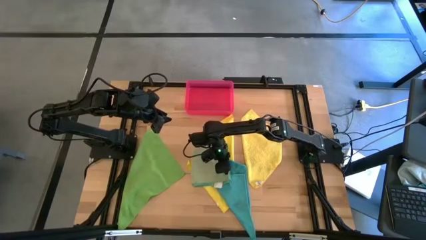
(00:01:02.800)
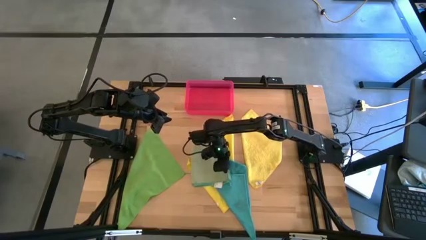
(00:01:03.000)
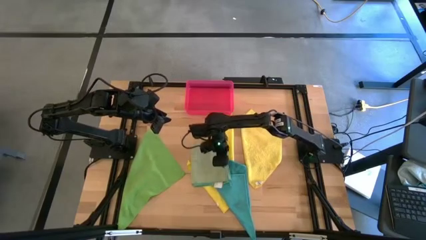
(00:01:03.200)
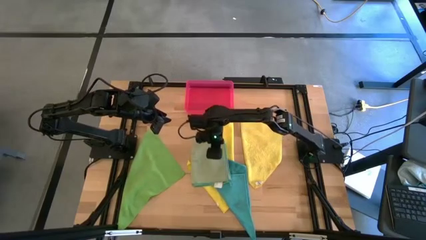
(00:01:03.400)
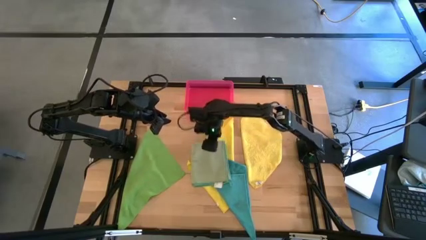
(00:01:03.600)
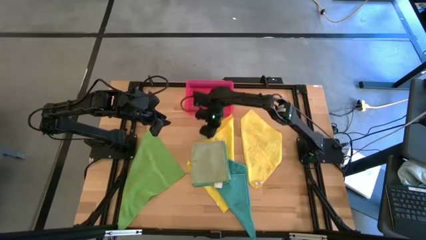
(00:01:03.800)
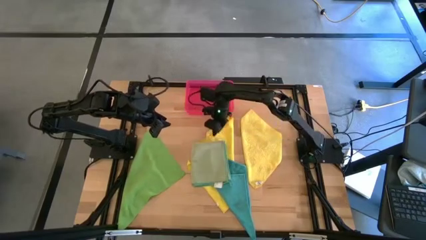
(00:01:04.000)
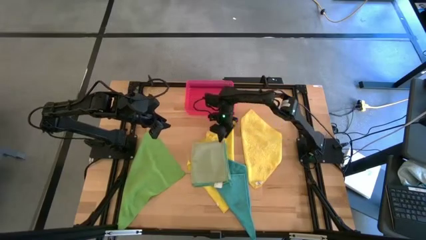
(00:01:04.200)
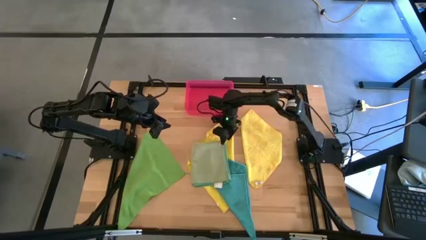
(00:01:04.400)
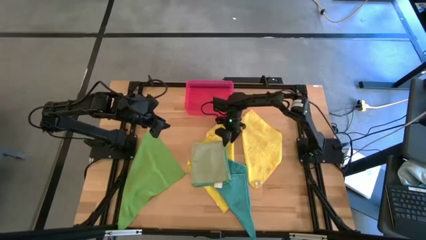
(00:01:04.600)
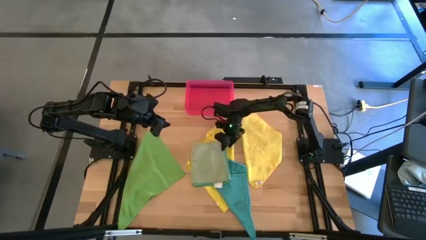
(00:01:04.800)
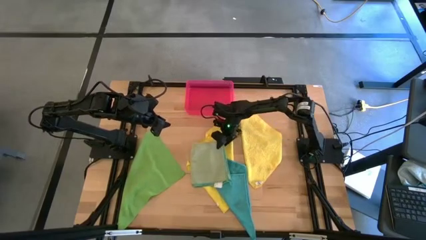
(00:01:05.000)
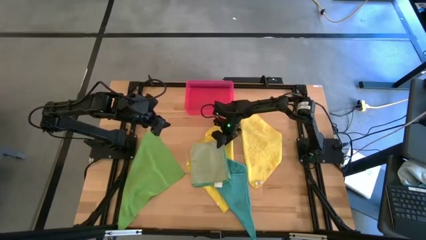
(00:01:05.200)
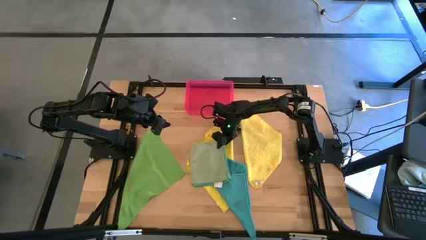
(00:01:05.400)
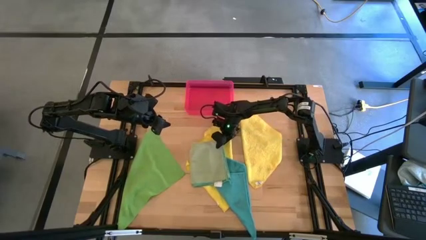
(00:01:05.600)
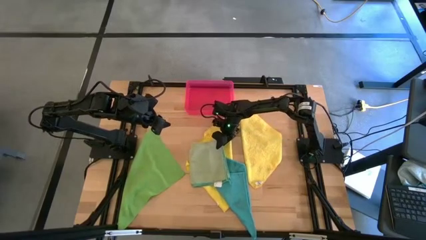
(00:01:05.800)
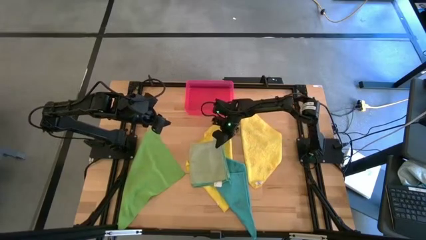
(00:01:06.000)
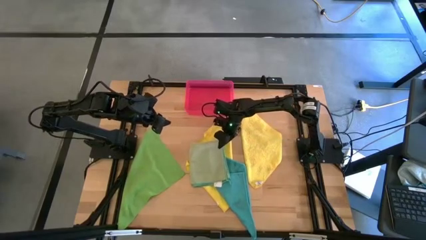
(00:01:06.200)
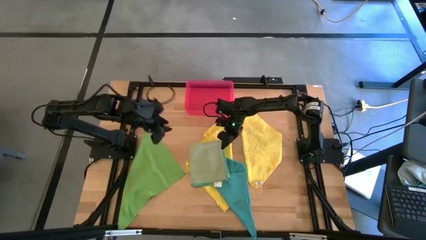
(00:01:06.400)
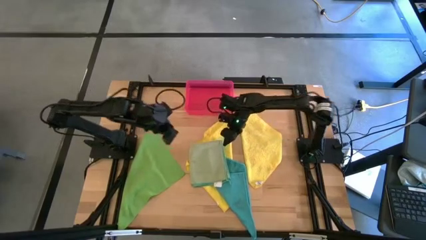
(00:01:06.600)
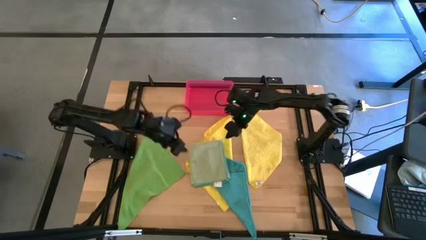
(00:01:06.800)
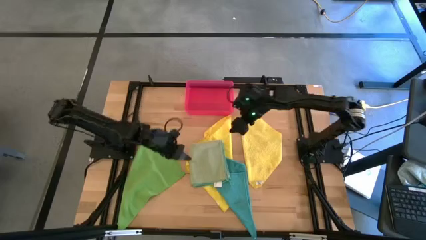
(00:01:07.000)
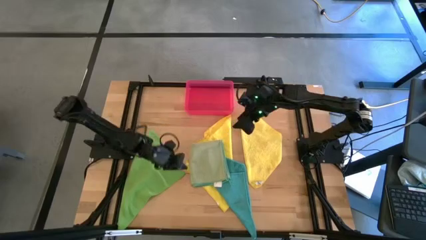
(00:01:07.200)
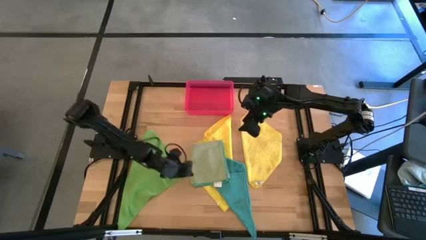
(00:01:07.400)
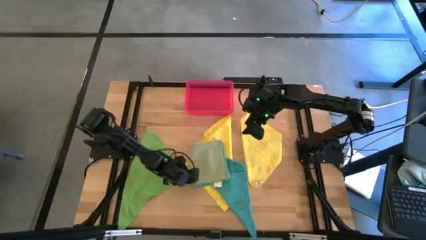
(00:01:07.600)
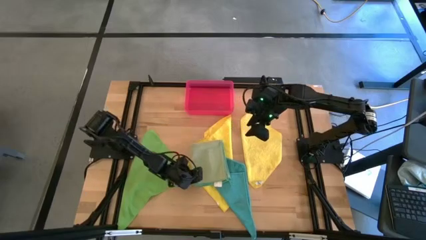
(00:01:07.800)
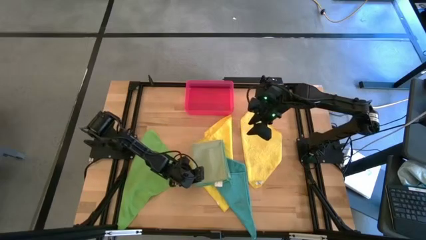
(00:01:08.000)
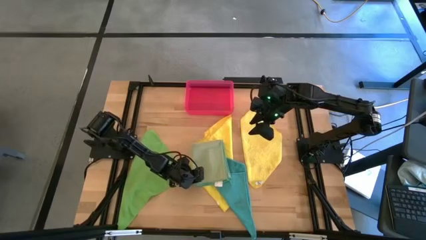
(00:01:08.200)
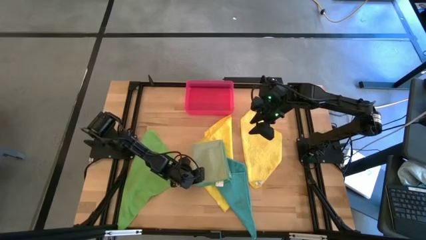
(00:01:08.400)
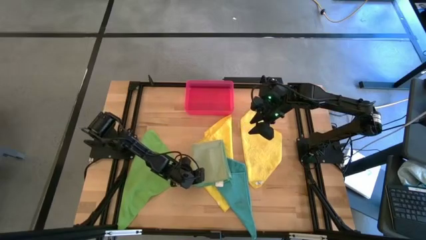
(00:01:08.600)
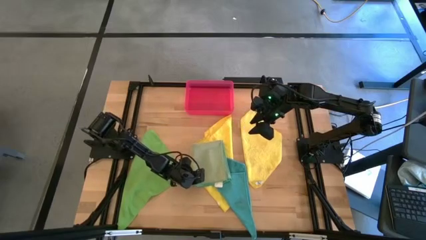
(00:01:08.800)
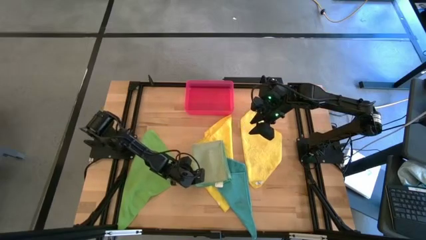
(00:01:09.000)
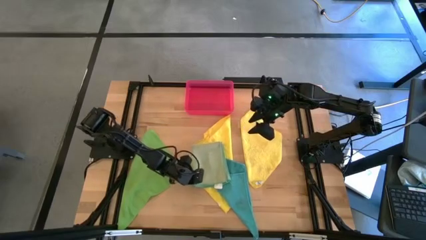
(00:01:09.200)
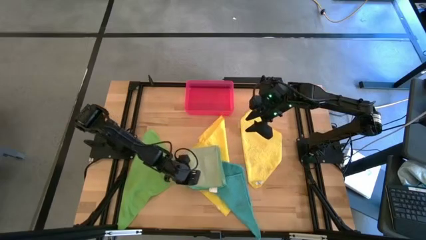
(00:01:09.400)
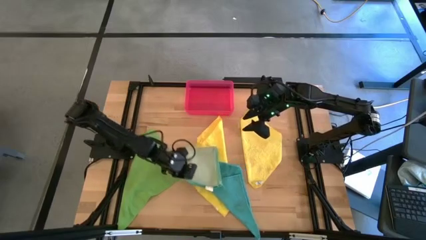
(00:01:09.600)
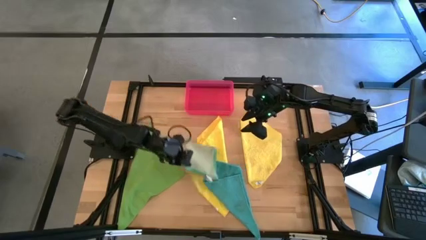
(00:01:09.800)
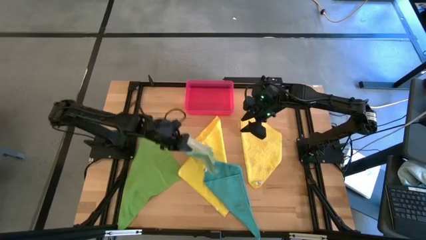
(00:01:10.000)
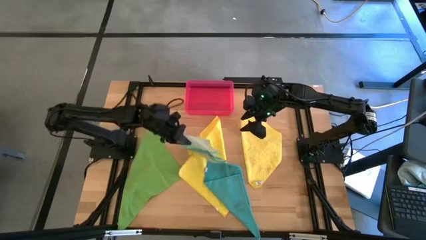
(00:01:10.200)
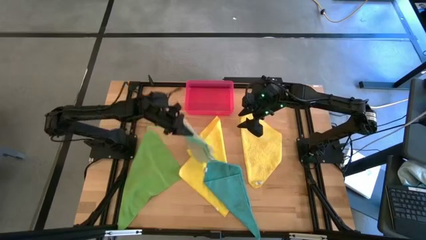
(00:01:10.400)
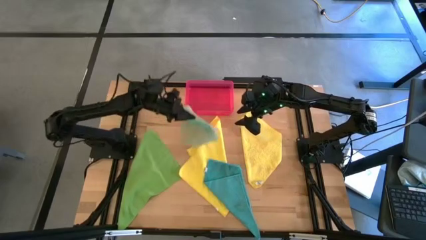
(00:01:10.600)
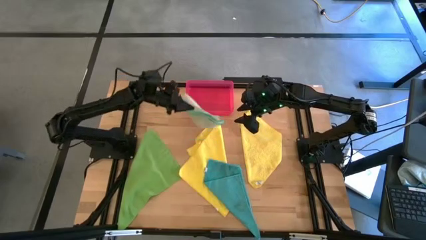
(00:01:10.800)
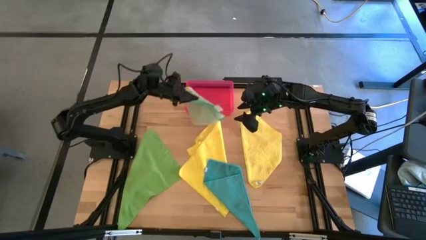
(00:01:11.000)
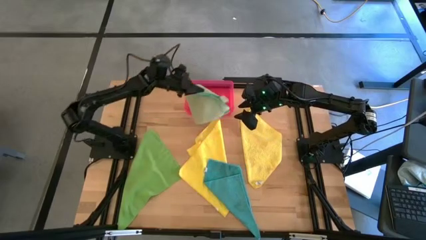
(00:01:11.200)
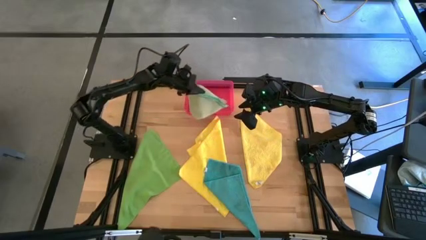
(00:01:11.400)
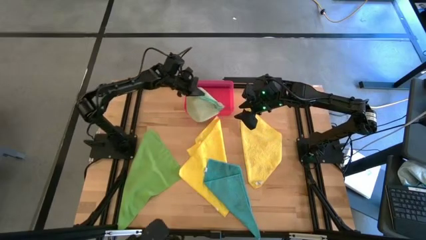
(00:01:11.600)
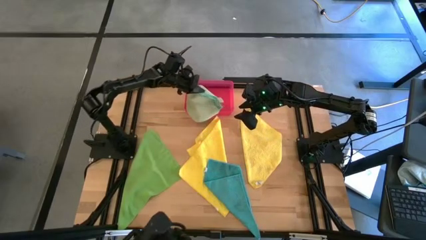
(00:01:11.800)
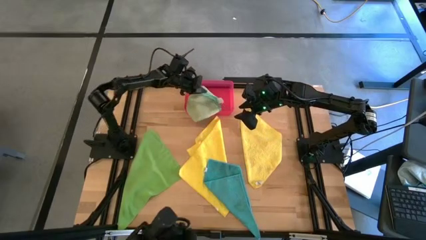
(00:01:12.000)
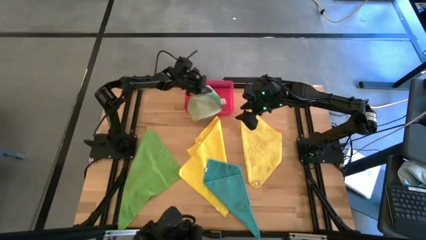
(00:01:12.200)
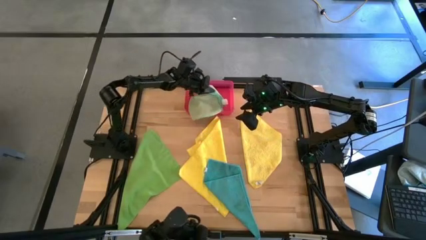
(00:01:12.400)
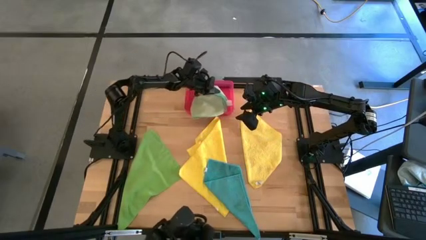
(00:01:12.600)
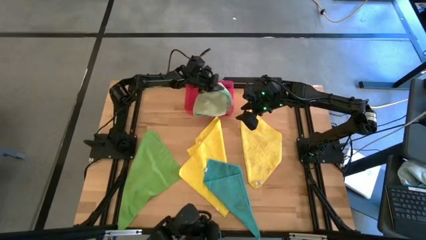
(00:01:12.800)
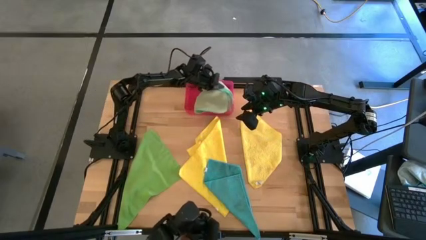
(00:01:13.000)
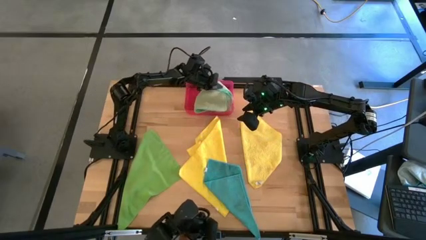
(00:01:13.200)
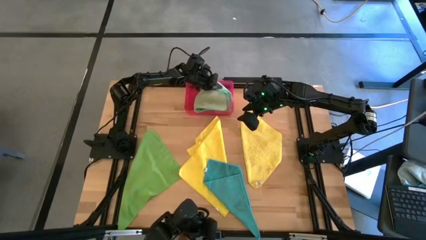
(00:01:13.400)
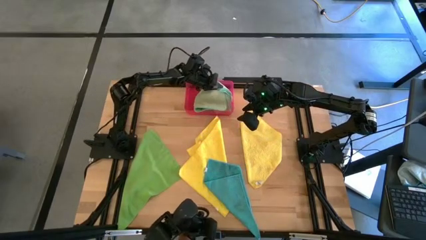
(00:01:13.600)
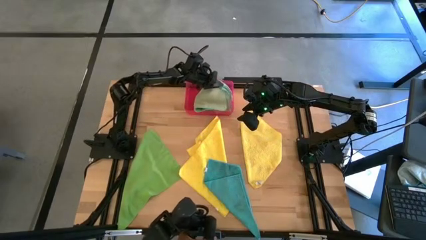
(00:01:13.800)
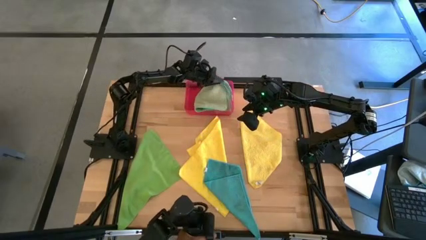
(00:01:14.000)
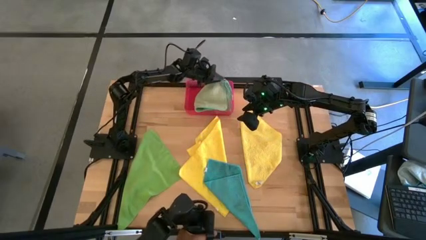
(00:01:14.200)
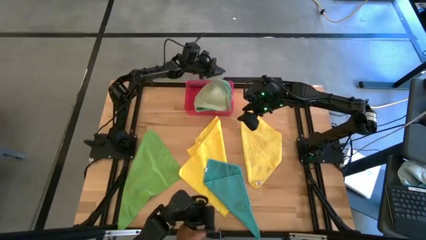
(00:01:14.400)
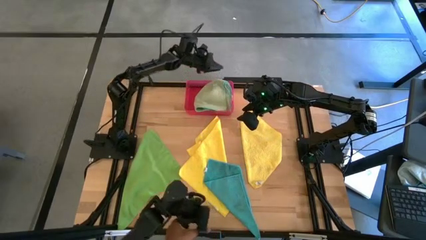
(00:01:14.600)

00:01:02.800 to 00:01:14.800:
Task: Fold microfiber towels
Put the folded light green microfiber cloth into the red bin

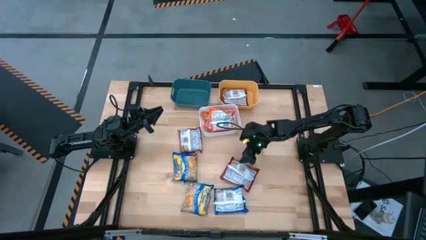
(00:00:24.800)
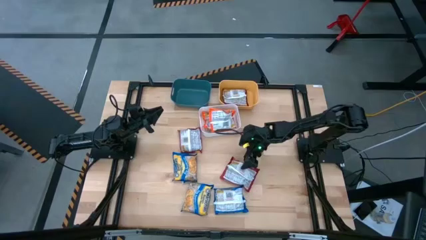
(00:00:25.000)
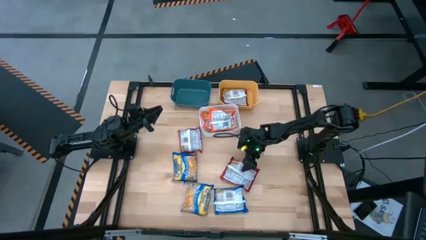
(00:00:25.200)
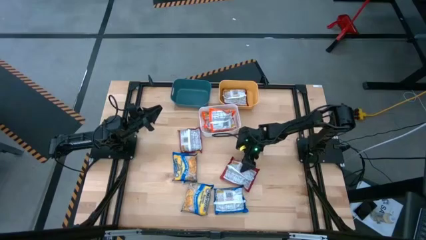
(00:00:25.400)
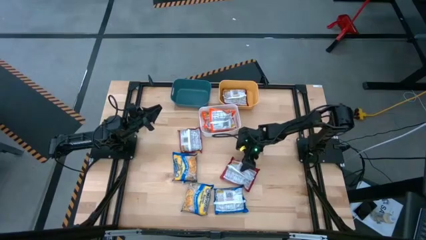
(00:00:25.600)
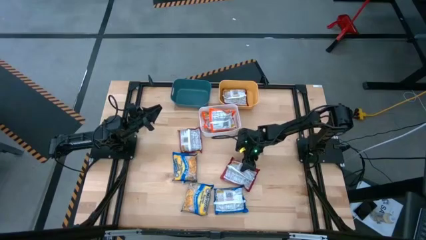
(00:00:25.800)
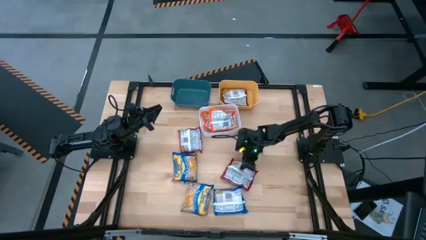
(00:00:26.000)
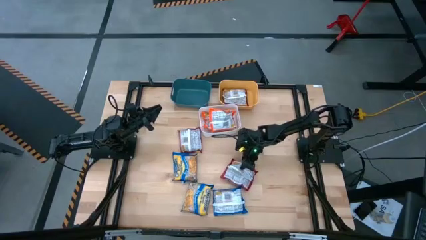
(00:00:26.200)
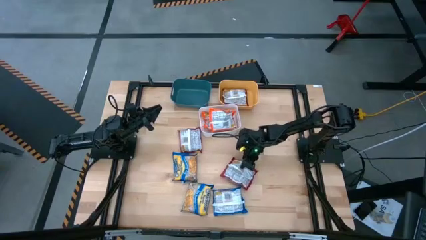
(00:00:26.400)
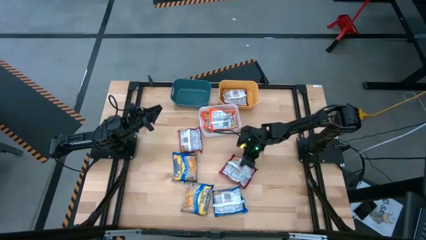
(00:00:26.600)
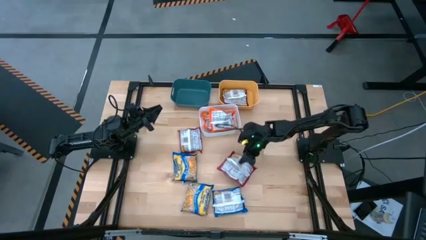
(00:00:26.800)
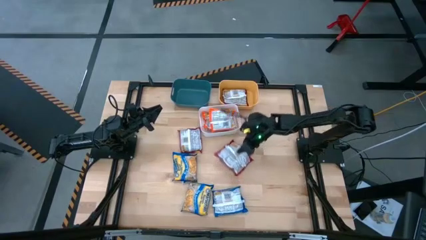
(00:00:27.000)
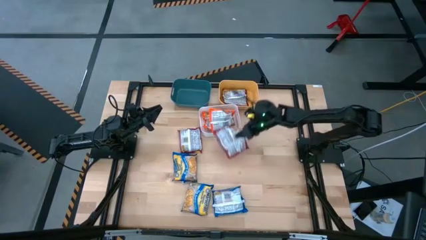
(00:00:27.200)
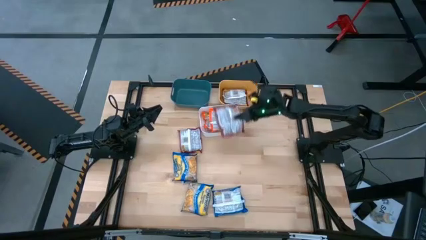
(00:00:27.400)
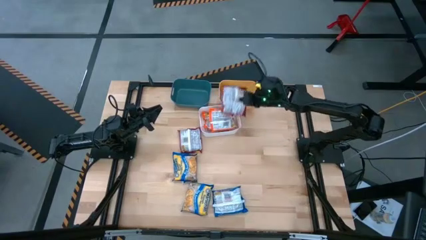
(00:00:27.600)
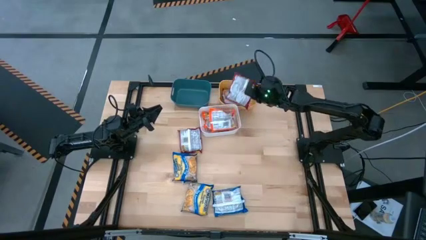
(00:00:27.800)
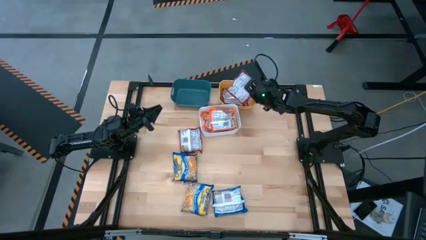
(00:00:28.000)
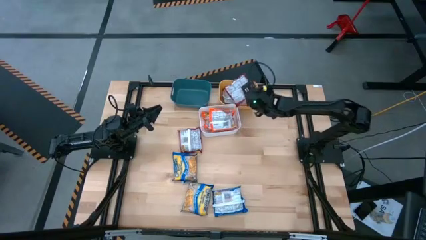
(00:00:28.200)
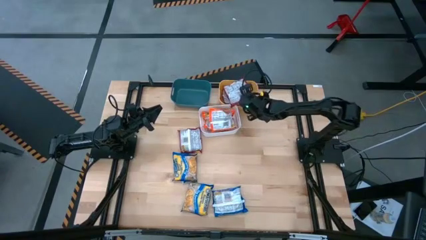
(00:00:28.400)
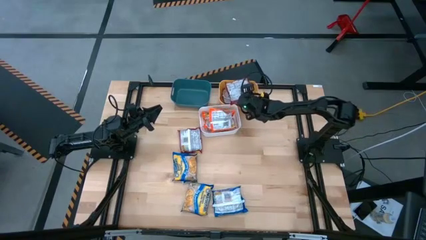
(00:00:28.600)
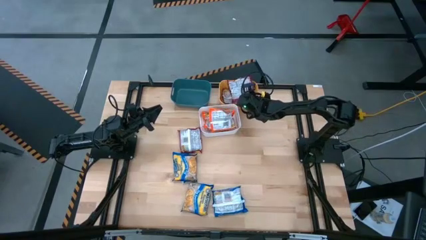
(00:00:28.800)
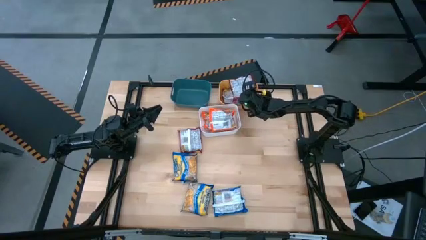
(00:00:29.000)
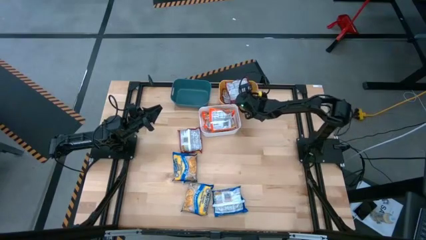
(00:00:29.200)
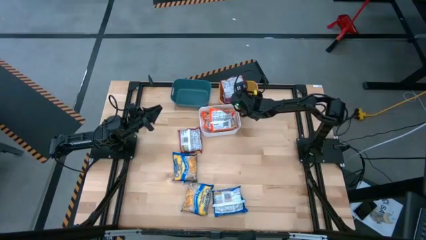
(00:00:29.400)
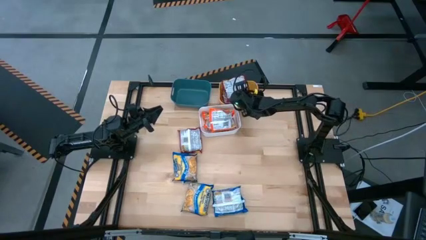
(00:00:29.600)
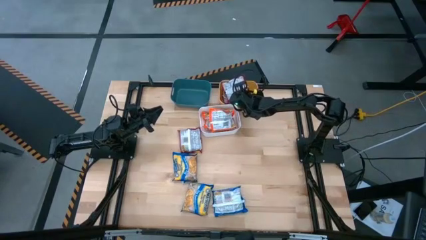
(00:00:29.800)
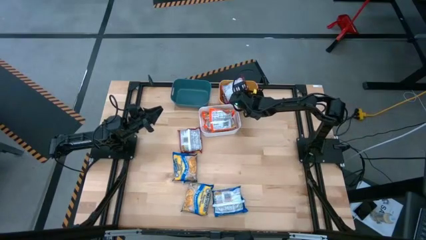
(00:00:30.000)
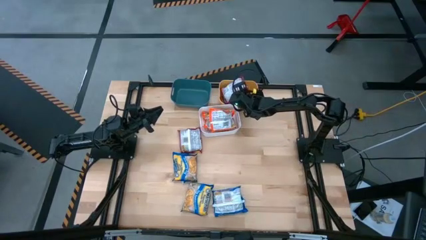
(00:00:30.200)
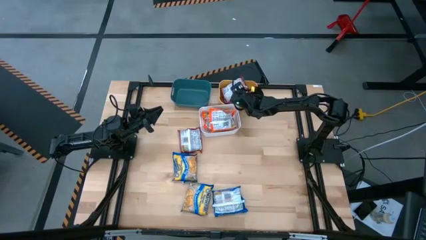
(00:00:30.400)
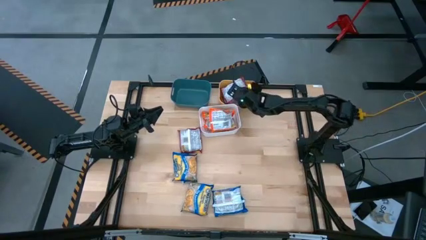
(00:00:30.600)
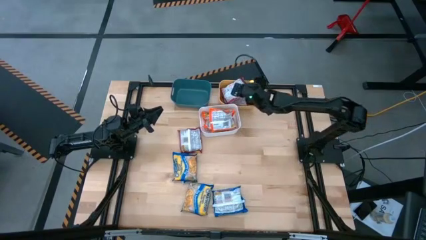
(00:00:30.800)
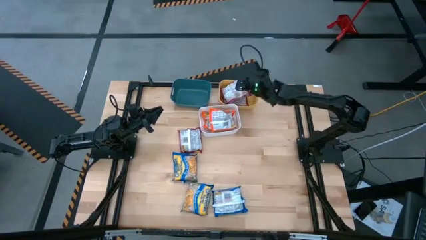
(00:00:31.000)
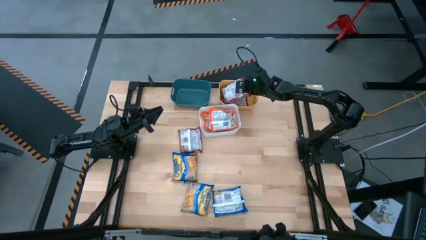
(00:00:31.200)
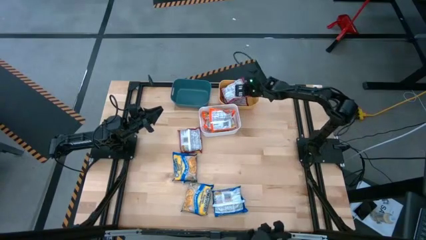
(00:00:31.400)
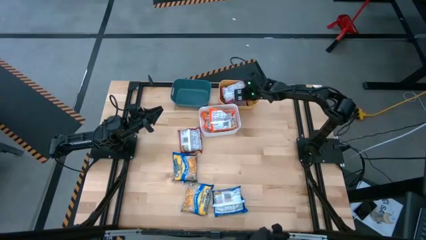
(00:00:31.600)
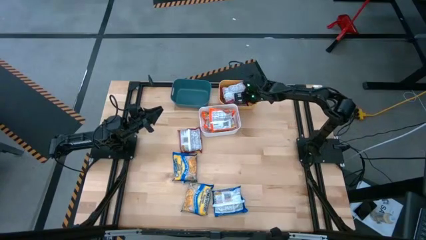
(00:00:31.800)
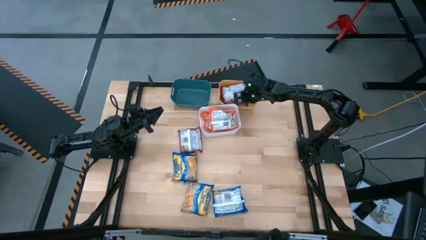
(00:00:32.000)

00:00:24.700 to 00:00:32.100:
Task: Sort Maruchan noodles
Put the bottom red noodle pack into the yellow bin
